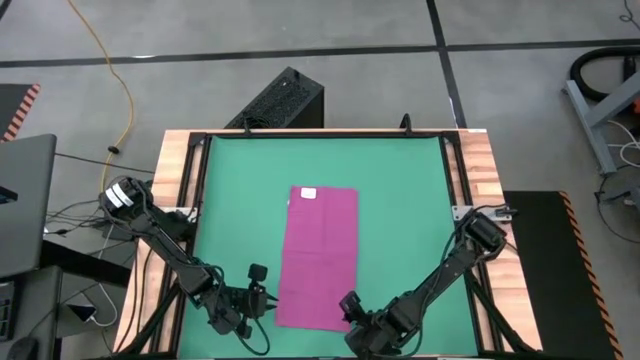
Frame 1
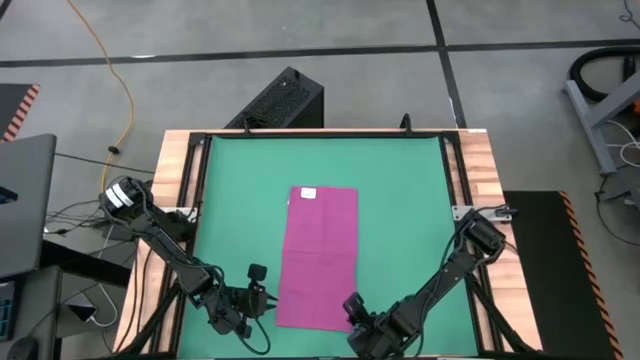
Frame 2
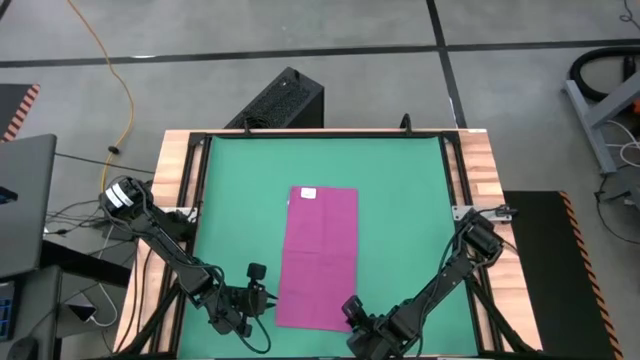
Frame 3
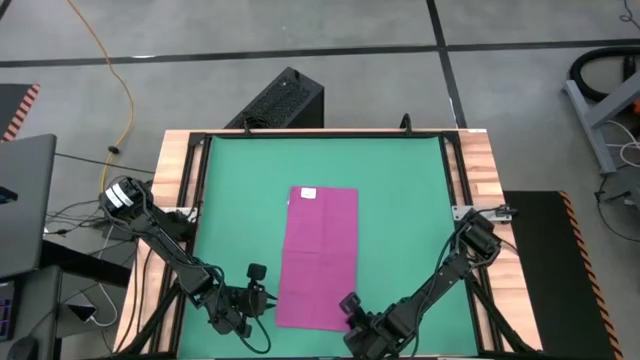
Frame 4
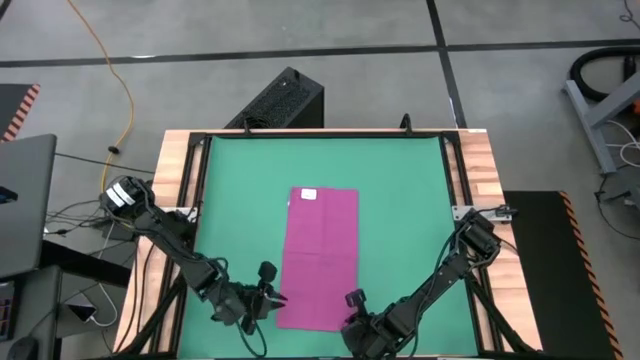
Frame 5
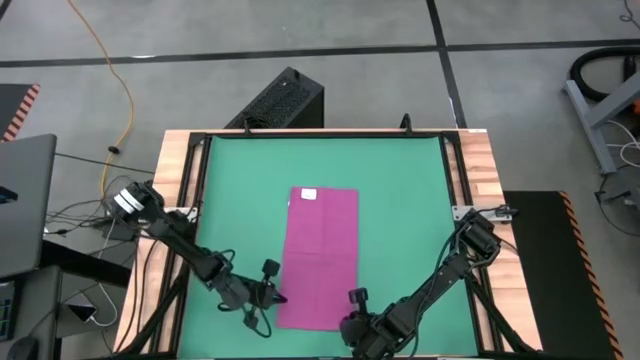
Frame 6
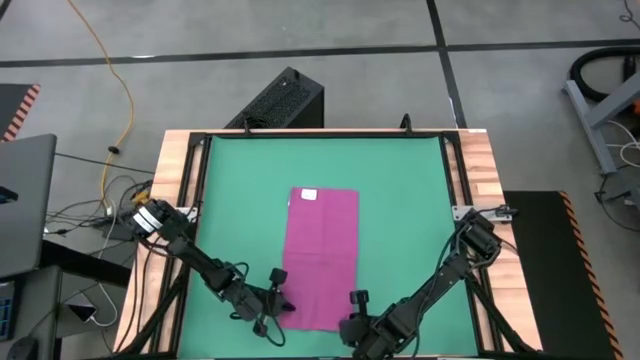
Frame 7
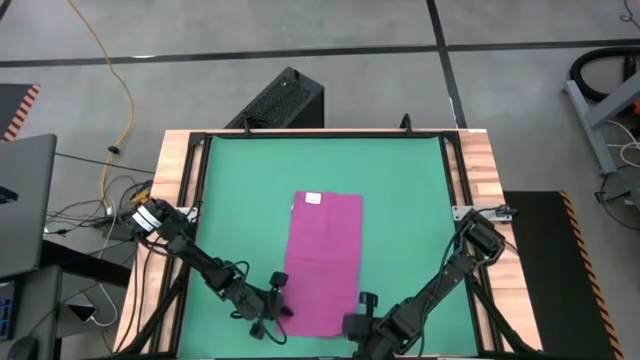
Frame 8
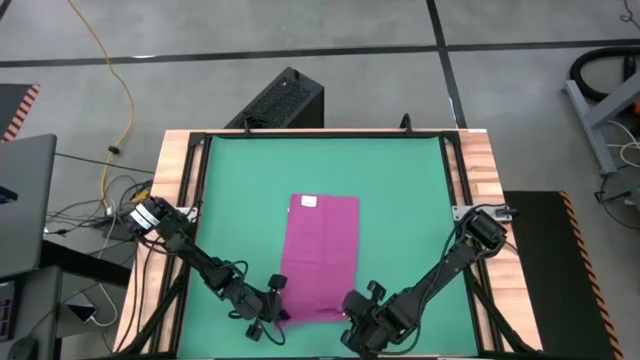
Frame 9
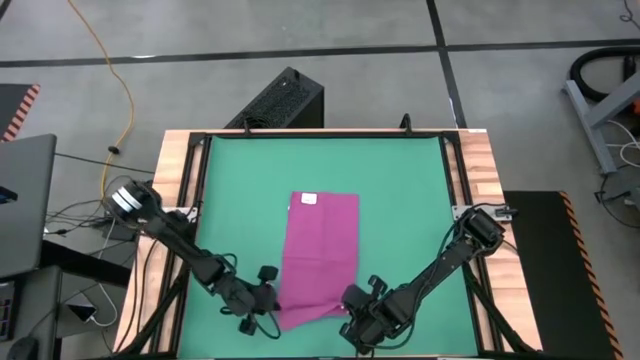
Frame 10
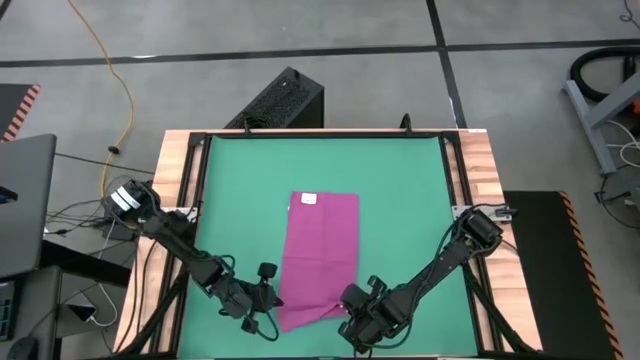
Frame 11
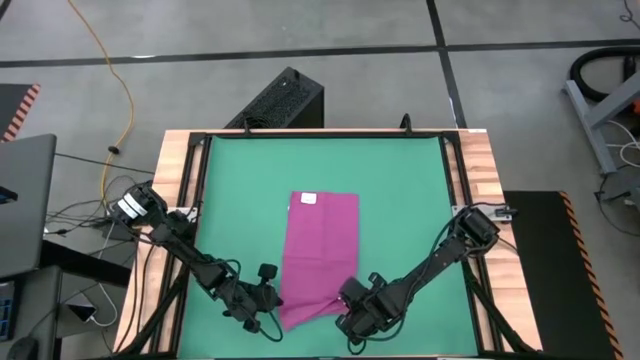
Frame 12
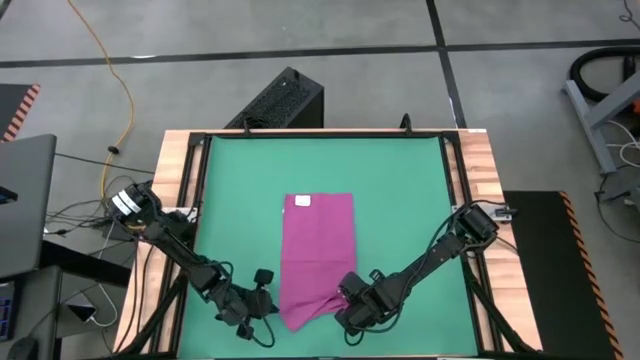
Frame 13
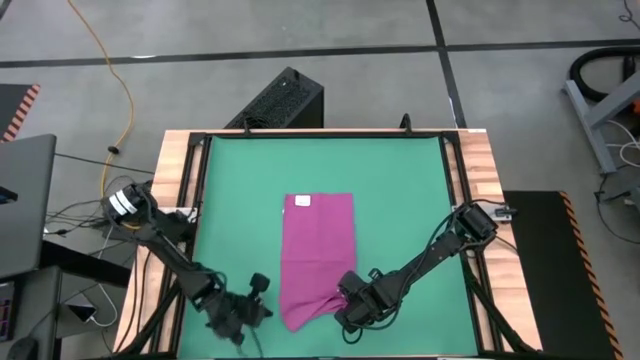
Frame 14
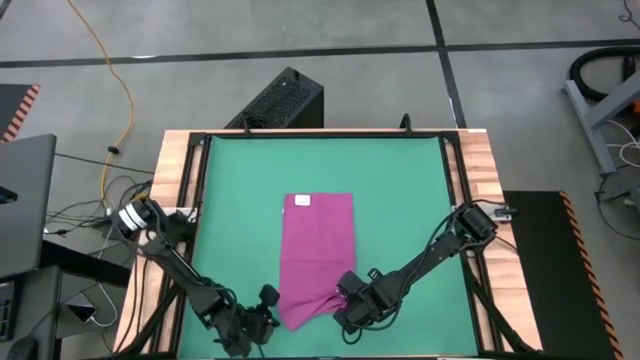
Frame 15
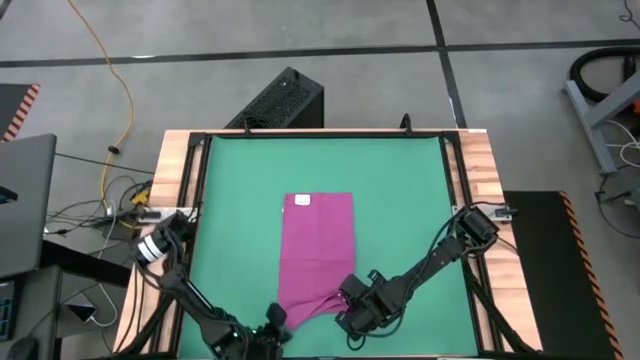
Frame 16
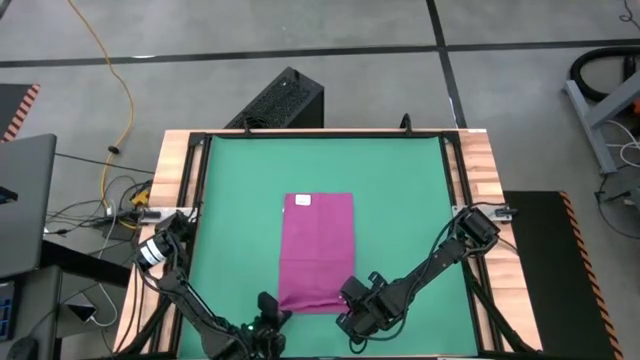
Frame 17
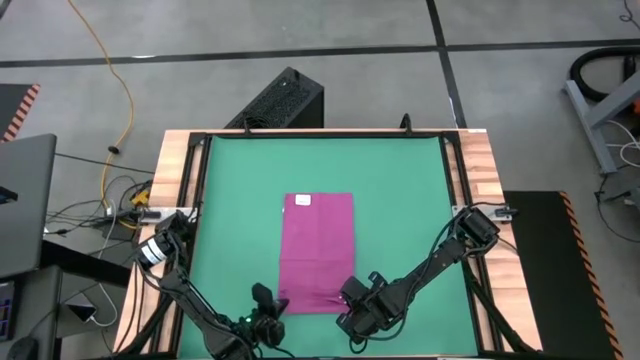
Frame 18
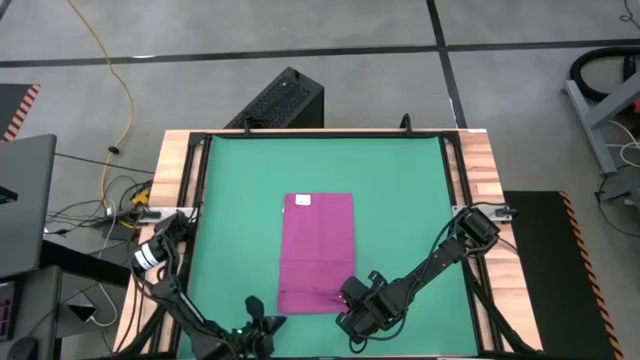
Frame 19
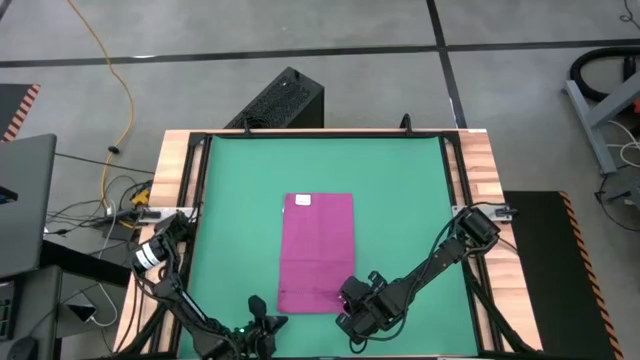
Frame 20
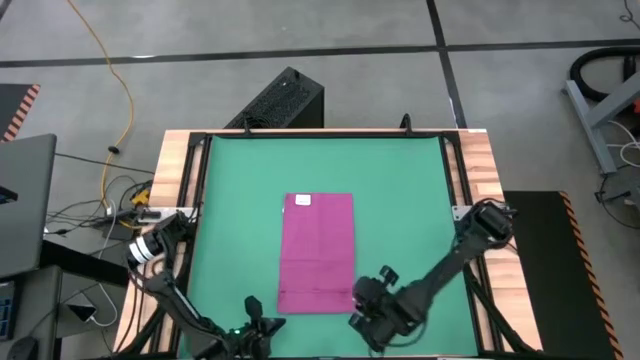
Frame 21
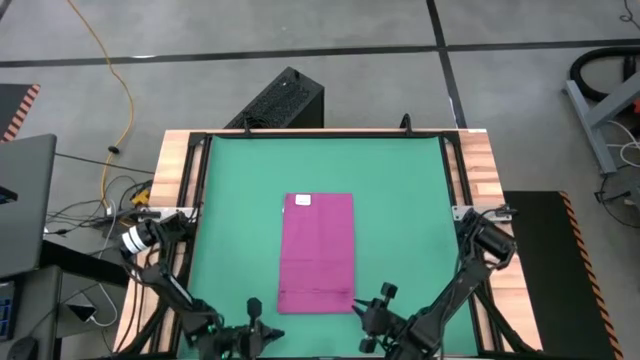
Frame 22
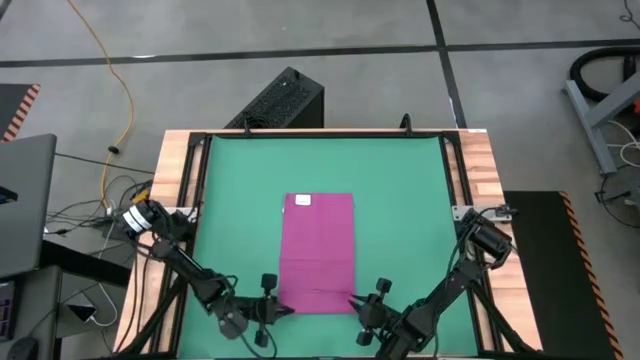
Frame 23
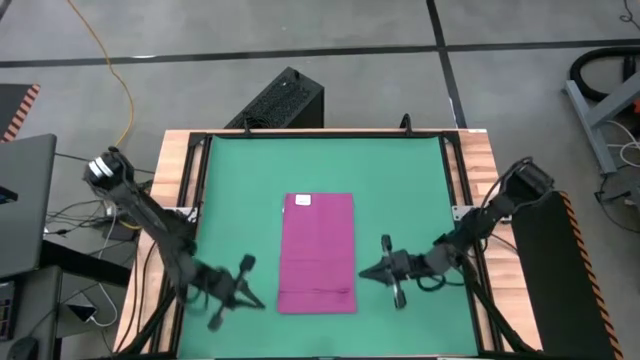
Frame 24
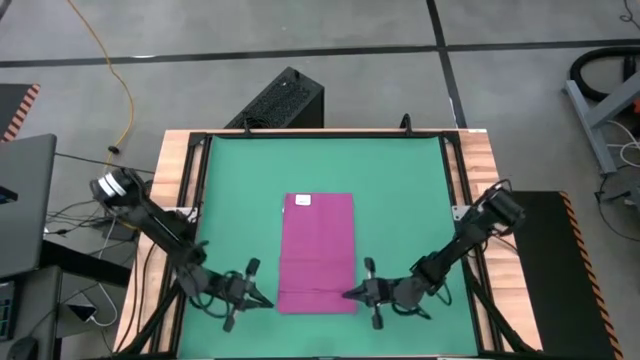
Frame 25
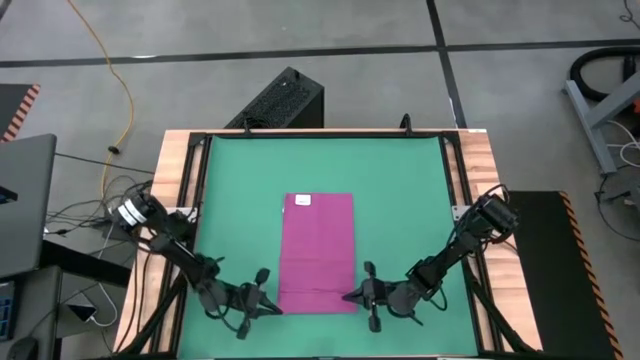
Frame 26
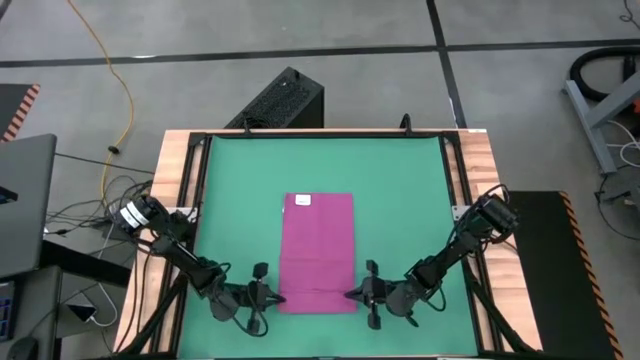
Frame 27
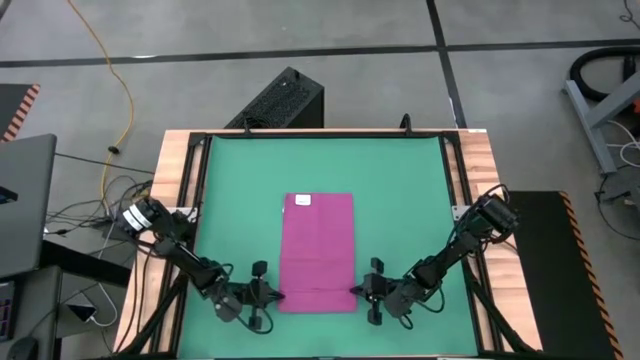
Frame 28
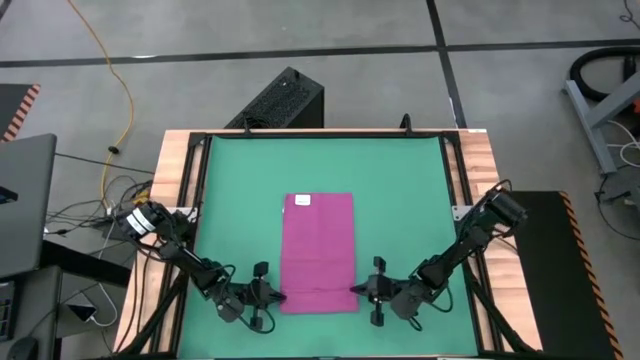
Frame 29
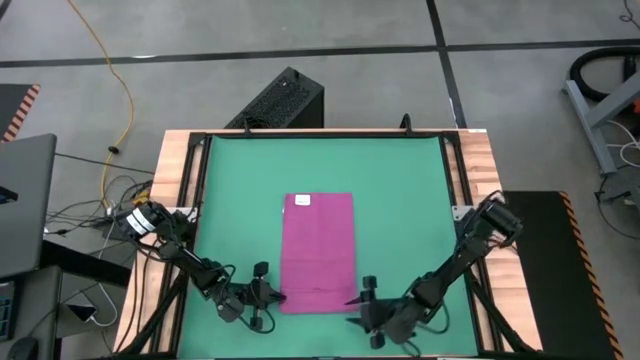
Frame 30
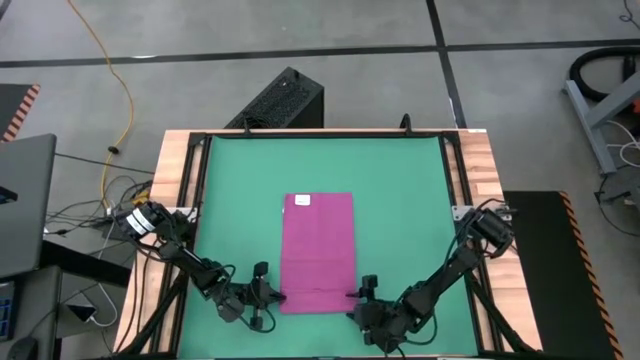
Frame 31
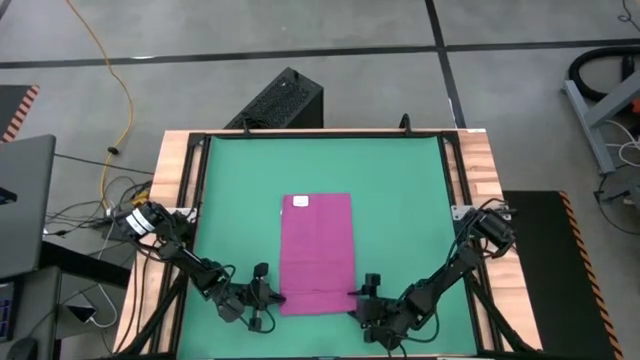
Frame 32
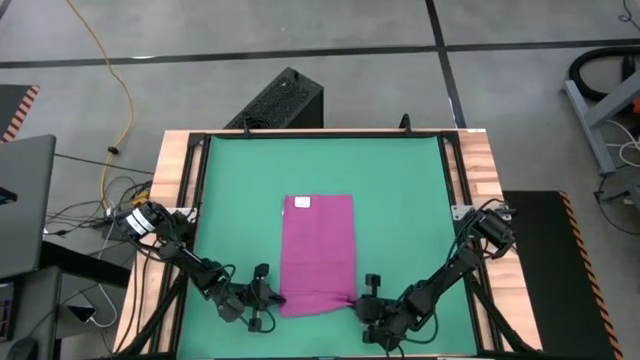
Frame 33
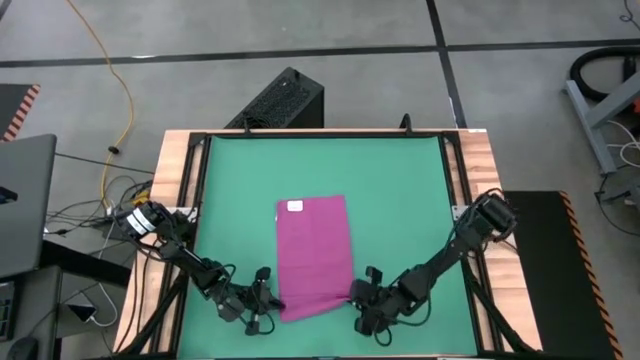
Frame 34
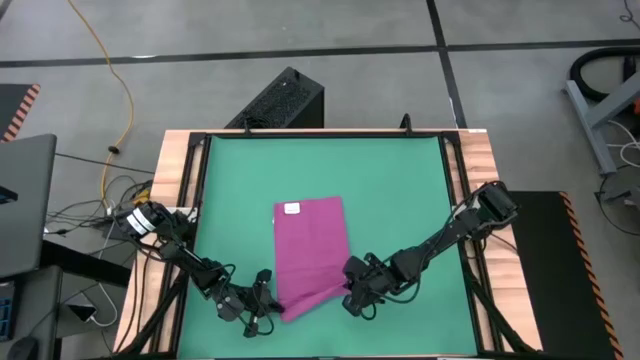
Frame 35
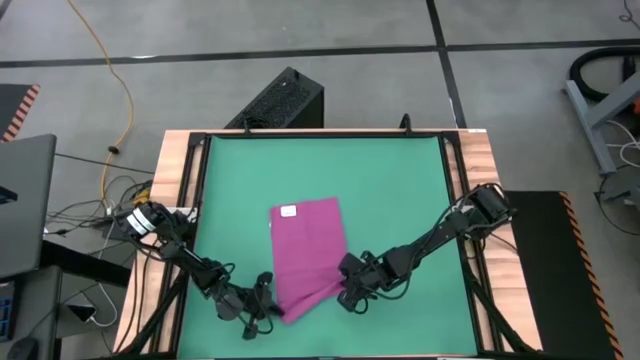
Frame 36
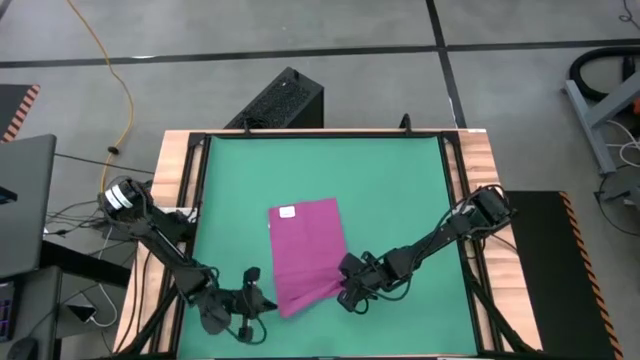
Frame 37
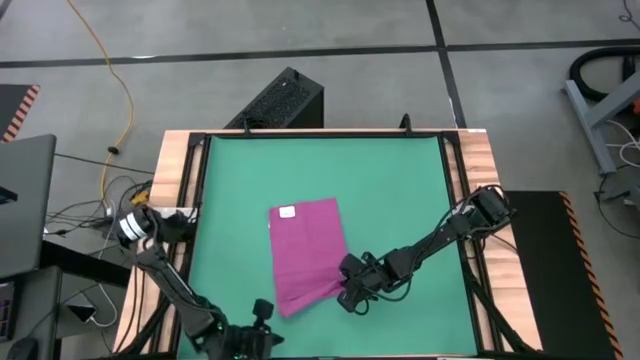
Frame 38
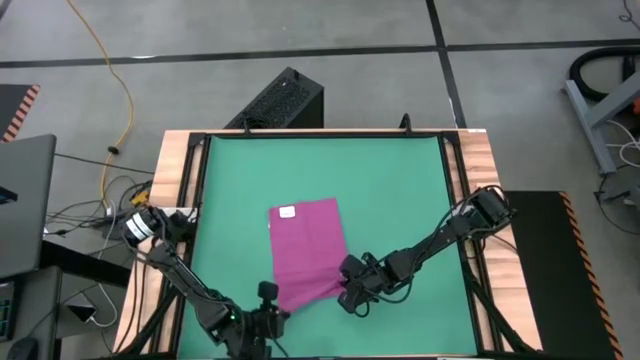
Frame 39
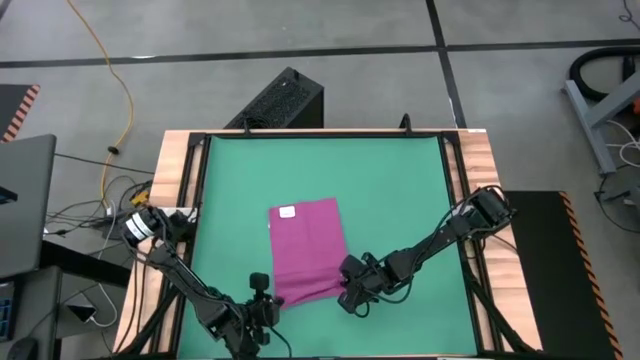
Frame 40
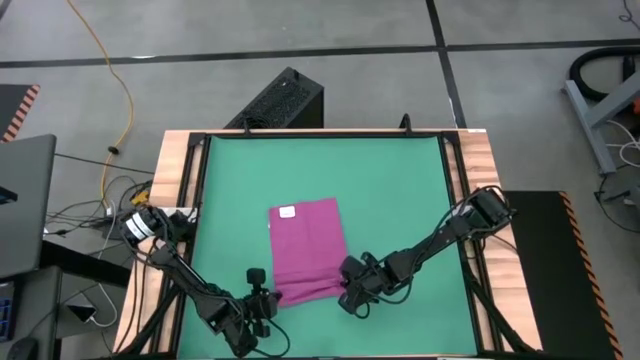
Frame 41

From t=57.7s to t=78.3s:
Task: Roll towel
Roll the pink towel
